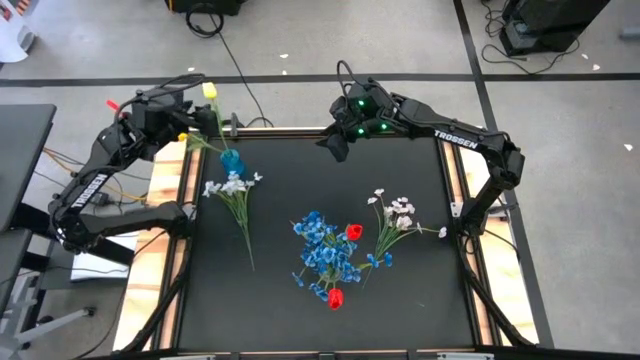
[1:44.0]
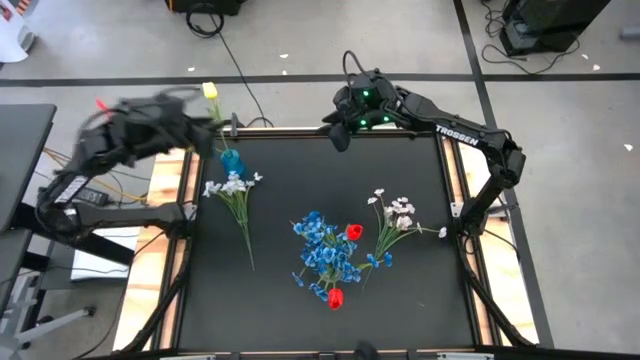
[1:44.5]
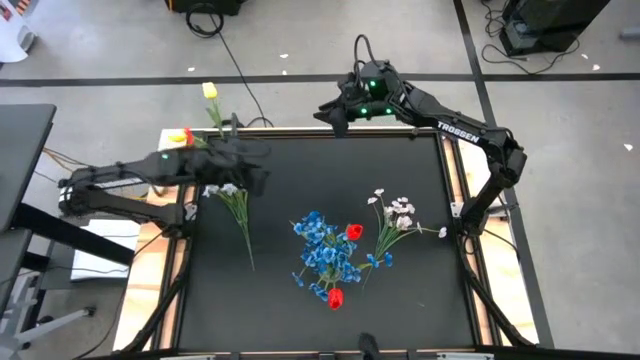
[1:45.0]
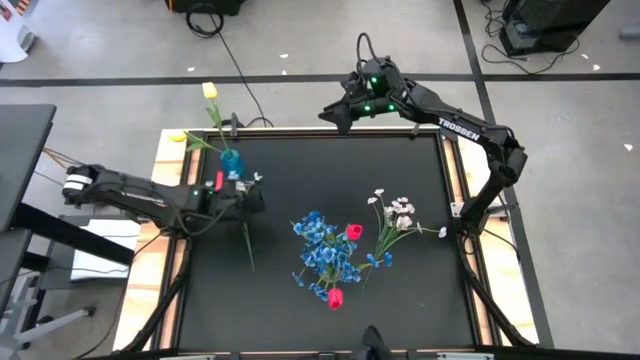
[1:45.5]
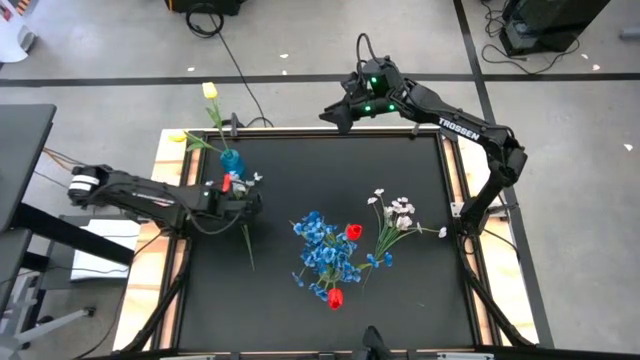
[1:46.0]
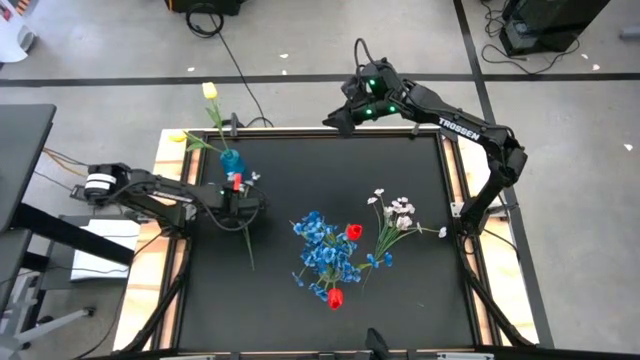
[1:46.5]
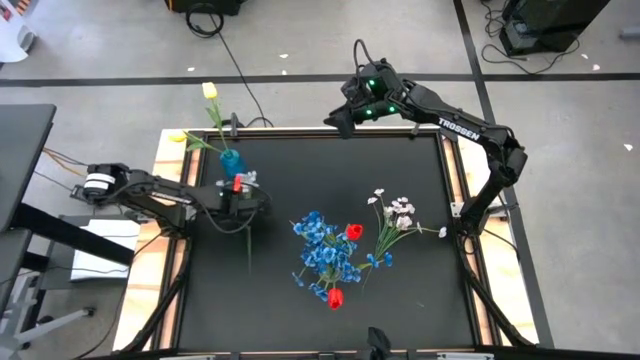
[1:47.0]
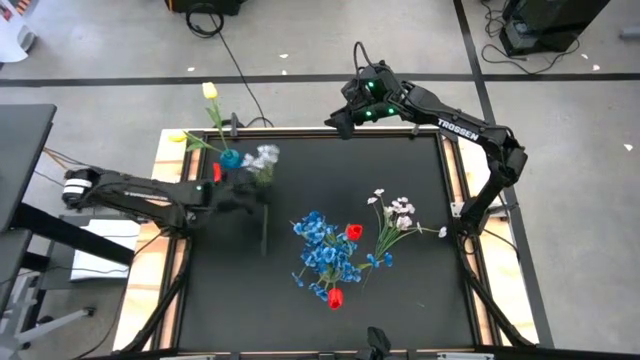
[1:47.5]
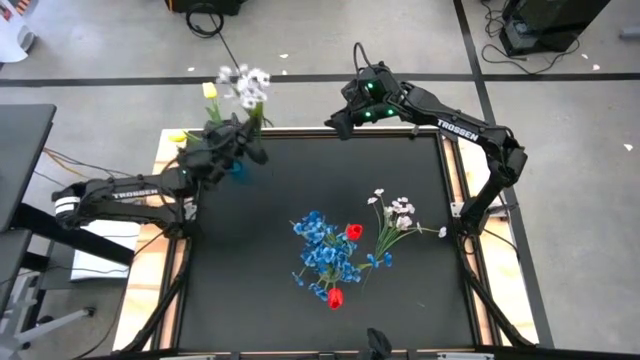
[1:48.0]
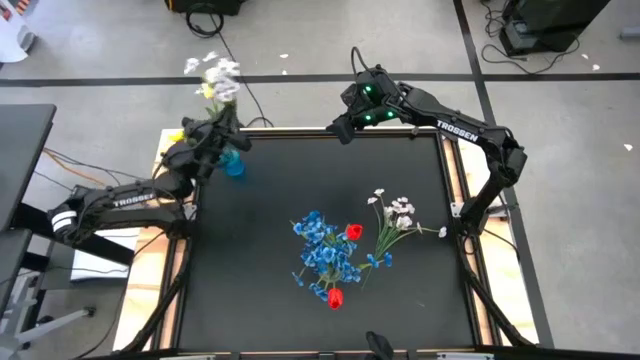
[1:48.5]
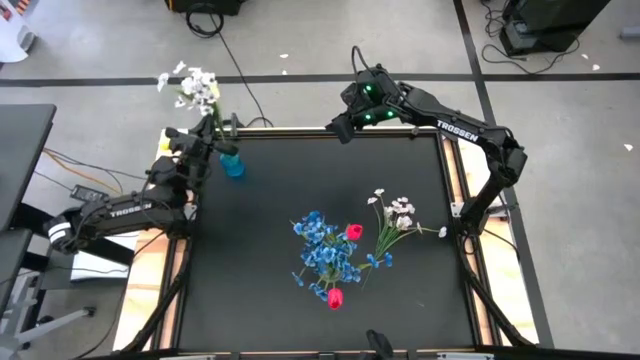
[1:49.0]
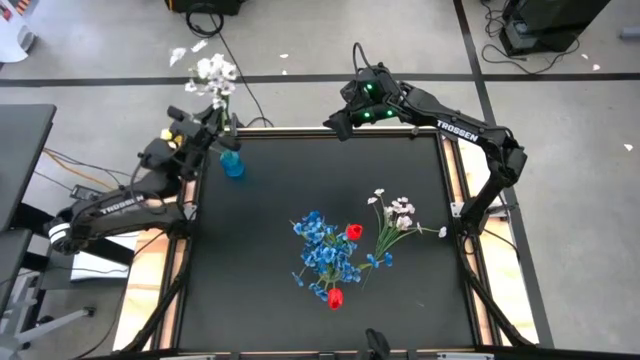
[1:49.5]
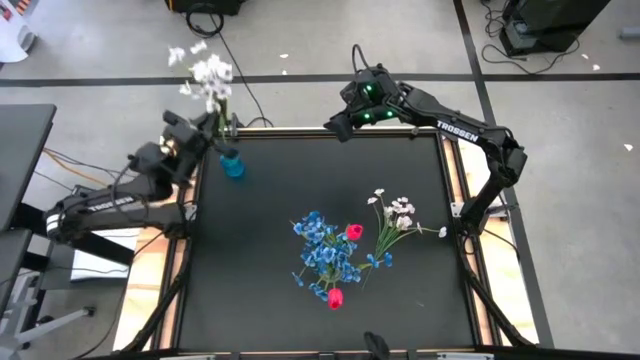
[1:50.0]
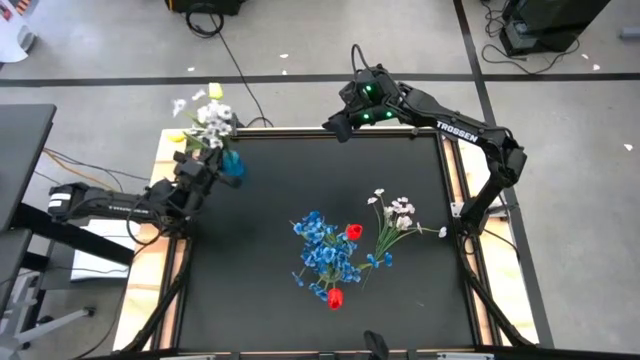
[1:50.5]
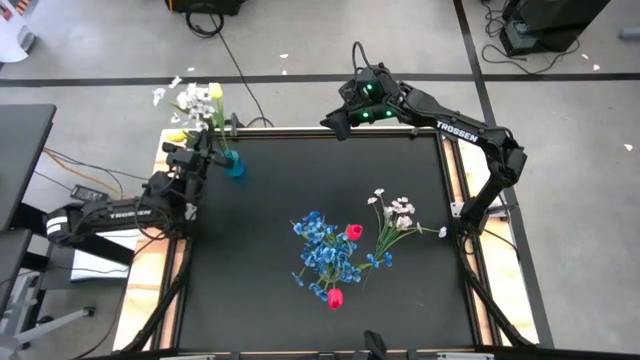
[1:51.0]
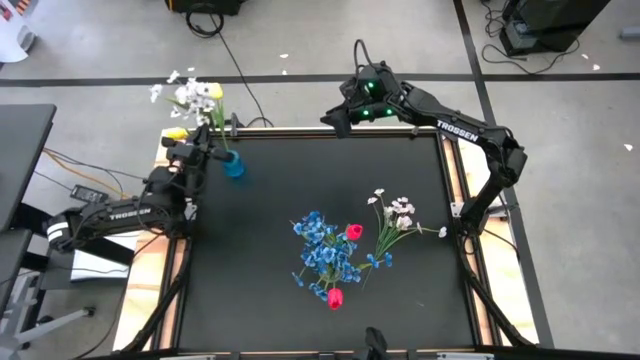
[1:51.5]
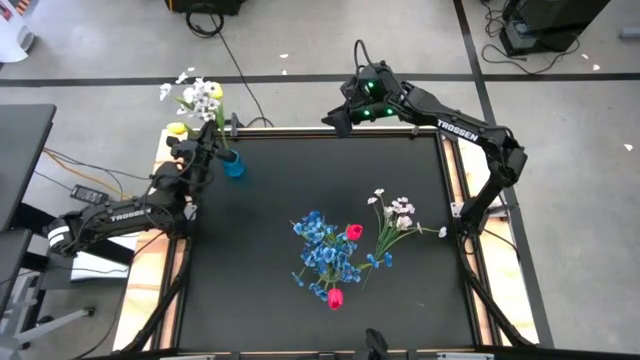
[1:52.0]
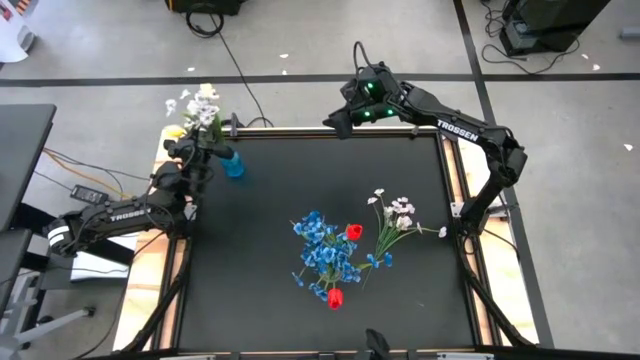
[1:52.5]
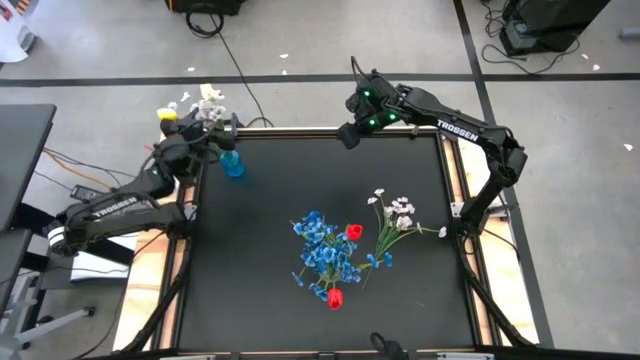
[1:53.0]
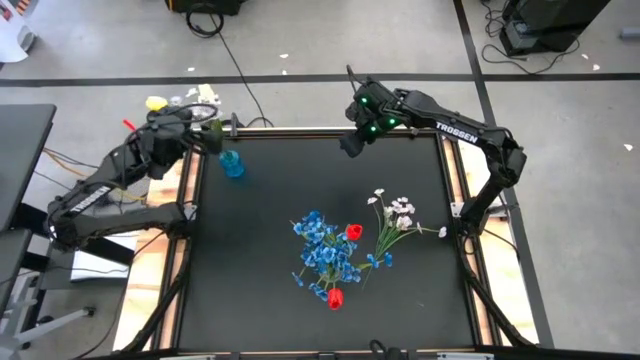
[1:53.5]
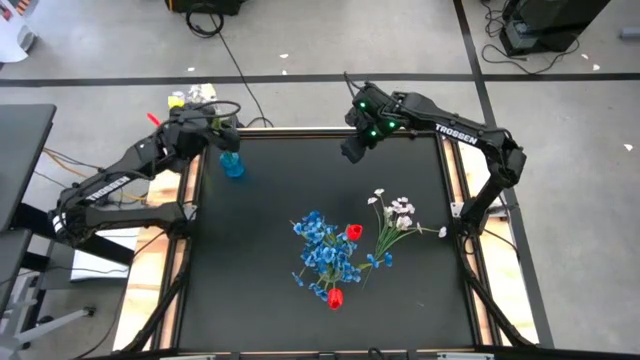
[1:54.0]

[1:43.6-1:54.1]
Task: Sort flowers into vase by color
Put the left white flower into the blue vase

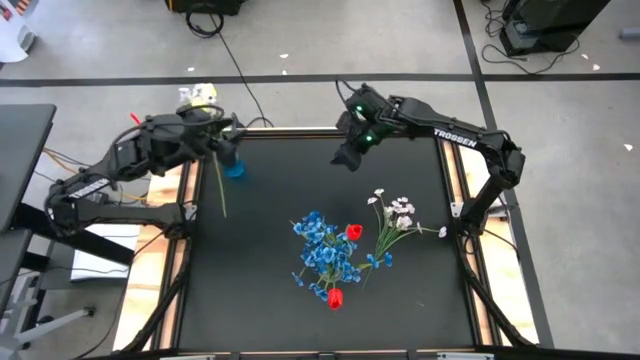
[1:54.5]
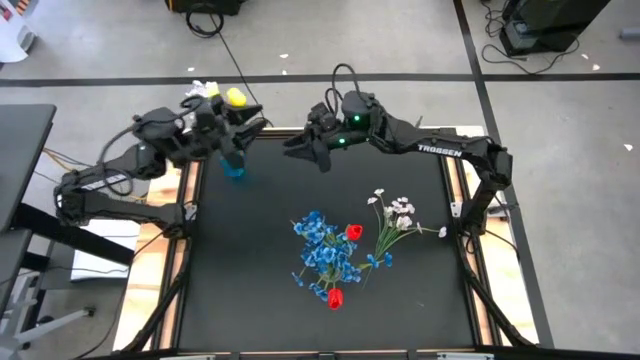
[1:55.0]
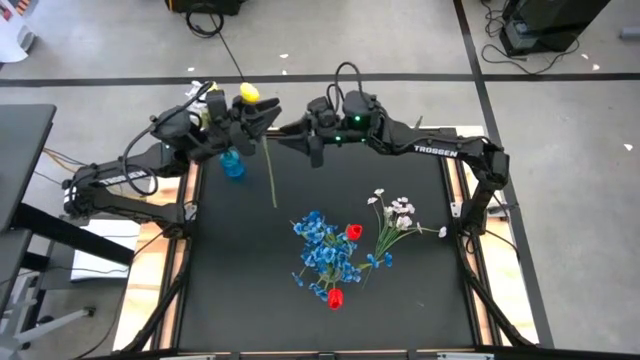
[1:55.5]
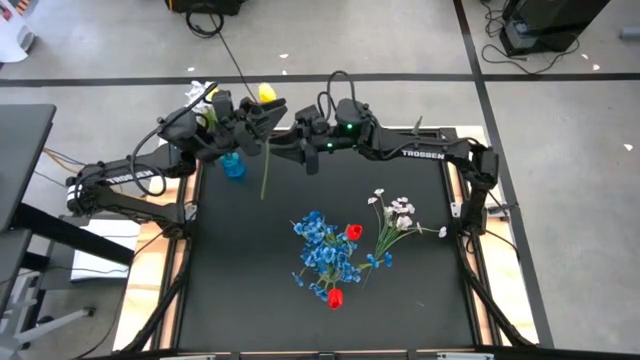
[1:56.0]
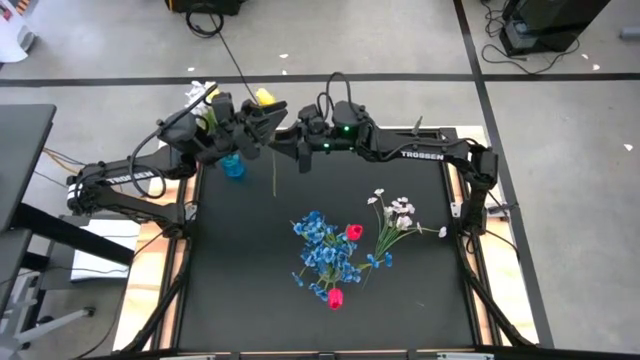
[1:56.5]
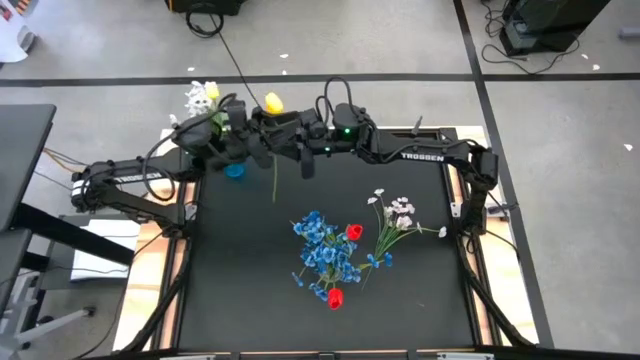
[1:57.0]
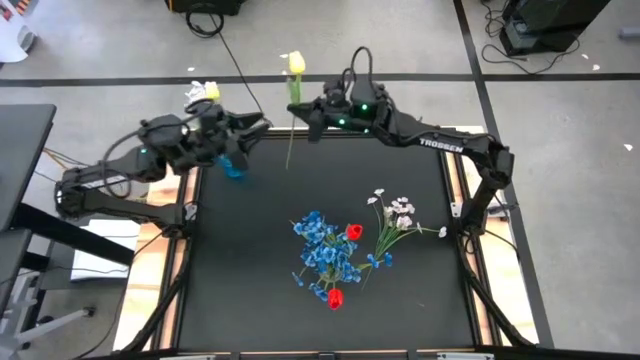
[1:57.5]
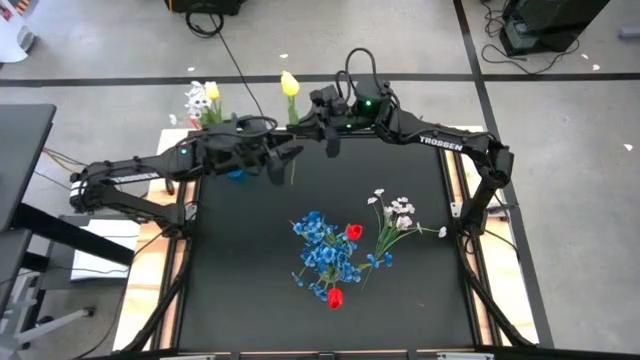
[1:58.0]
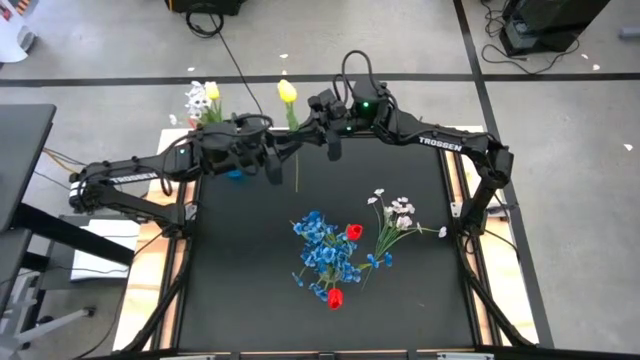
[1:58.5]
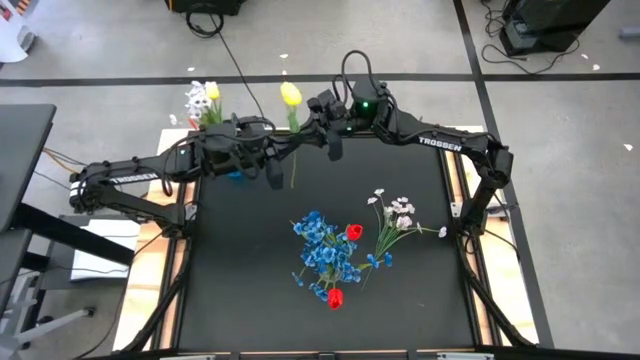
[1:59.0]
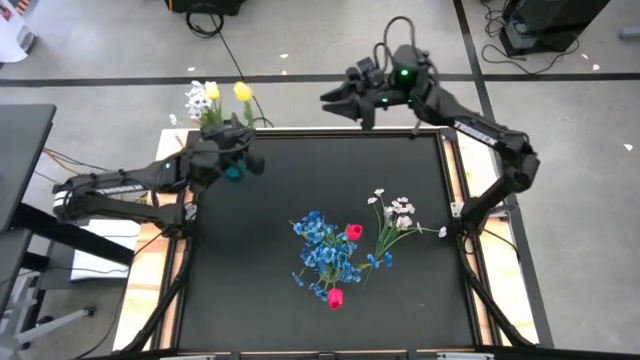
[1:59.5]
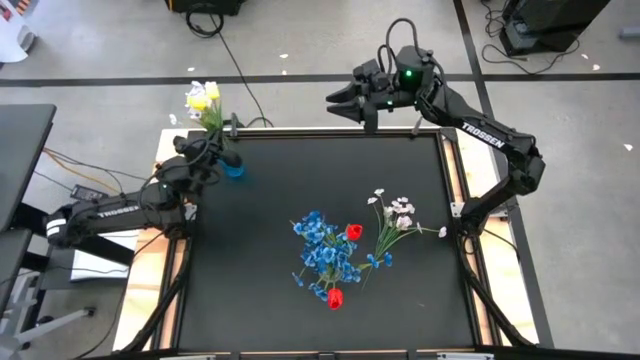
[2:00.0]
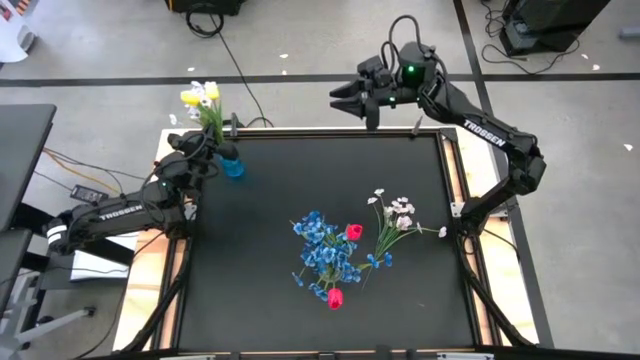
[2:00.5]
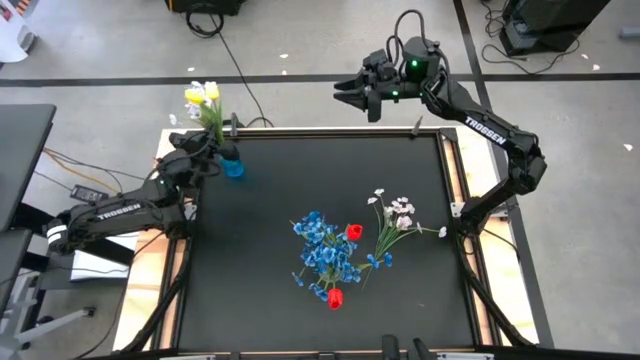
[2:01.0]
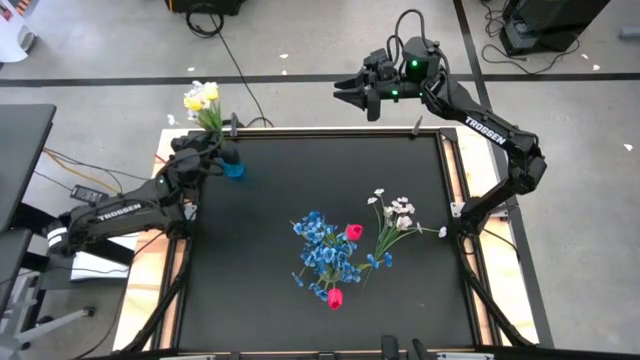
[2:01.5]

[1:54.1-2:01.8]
Put the yellow flower into the blue vase
